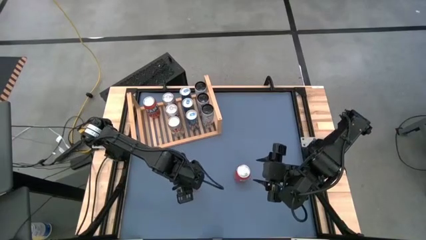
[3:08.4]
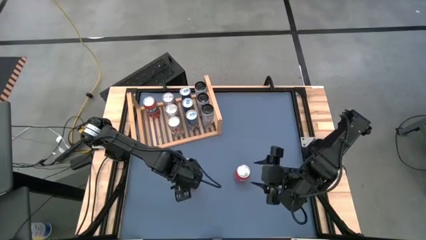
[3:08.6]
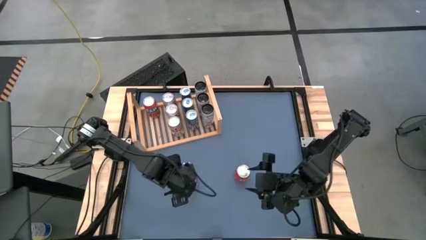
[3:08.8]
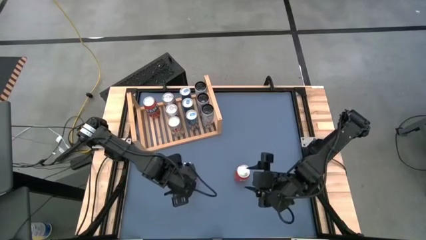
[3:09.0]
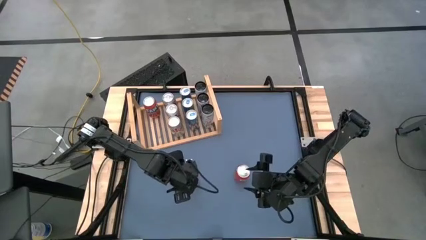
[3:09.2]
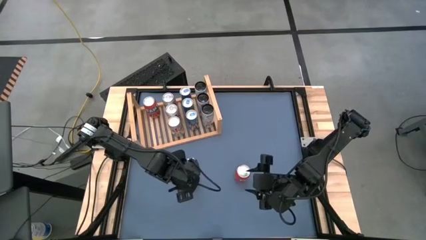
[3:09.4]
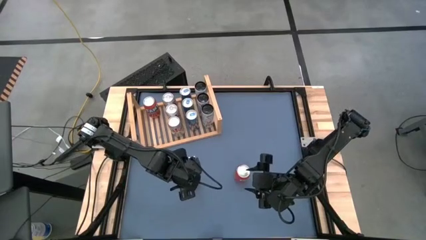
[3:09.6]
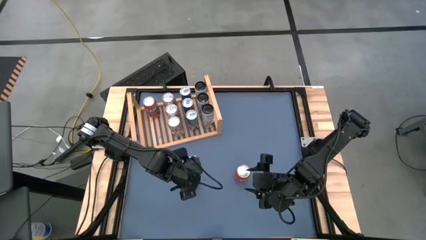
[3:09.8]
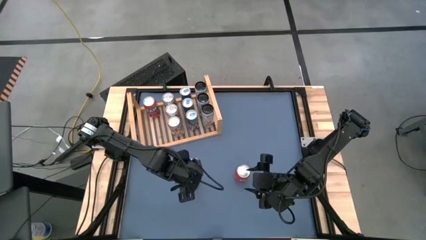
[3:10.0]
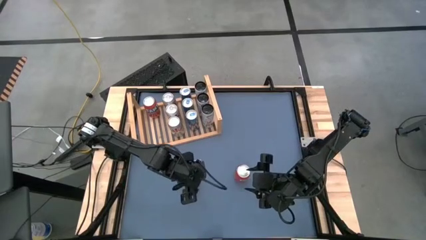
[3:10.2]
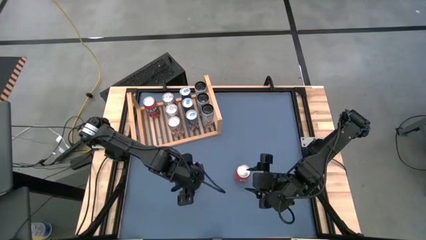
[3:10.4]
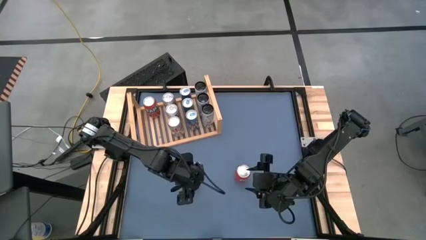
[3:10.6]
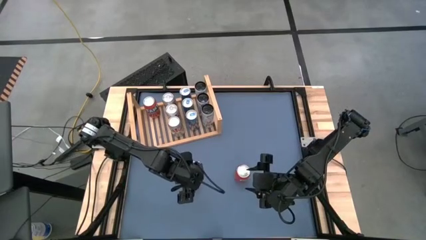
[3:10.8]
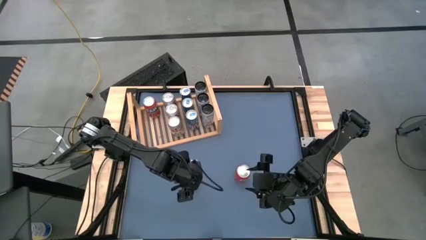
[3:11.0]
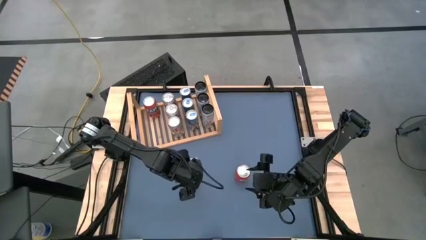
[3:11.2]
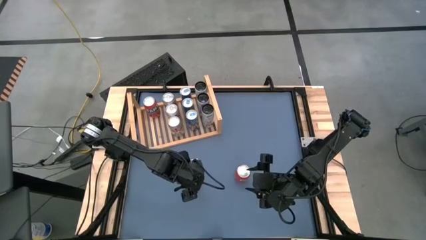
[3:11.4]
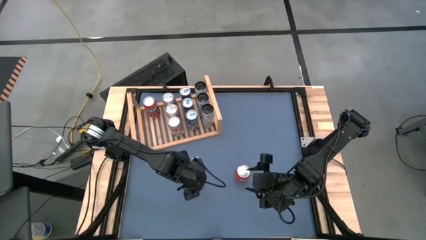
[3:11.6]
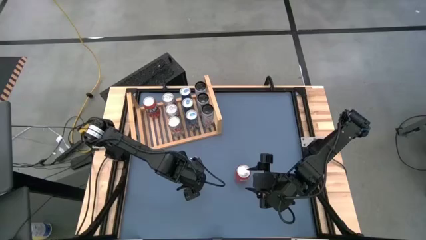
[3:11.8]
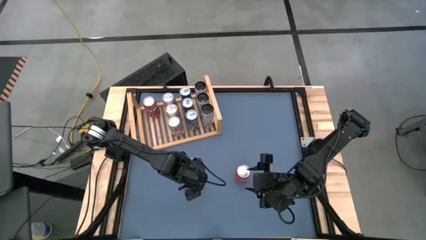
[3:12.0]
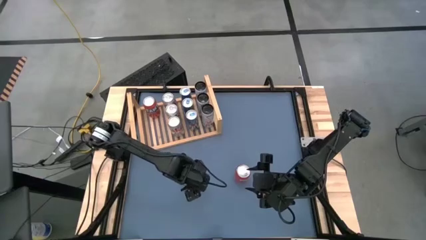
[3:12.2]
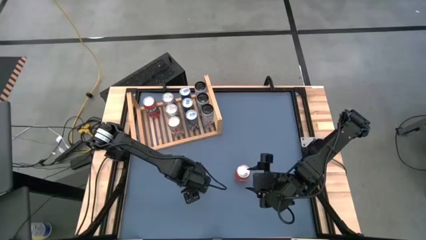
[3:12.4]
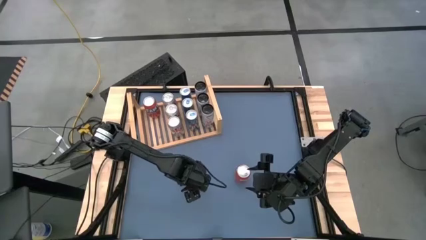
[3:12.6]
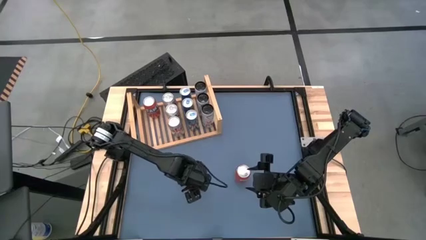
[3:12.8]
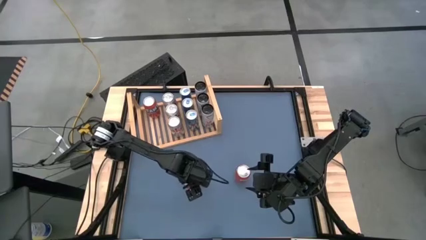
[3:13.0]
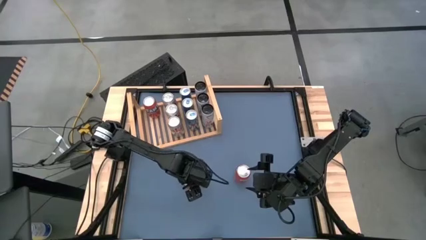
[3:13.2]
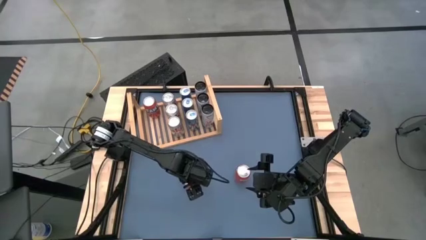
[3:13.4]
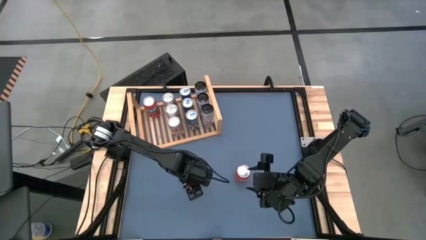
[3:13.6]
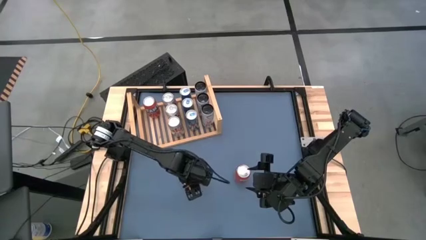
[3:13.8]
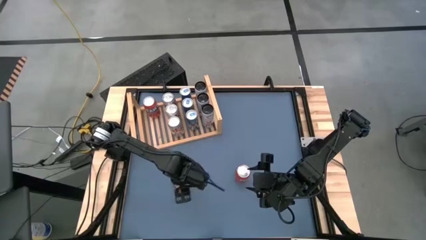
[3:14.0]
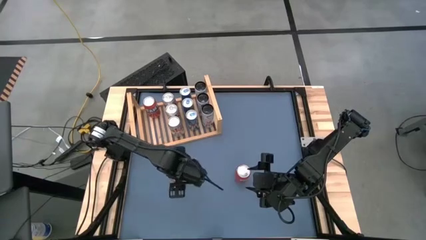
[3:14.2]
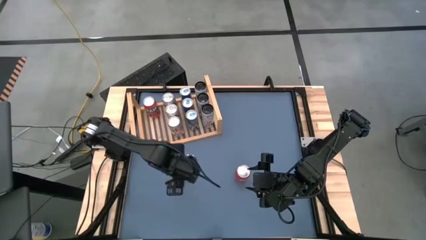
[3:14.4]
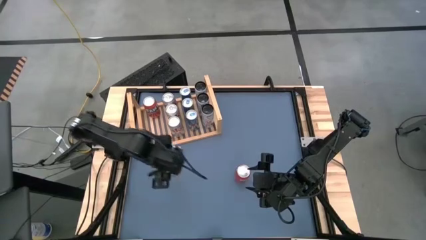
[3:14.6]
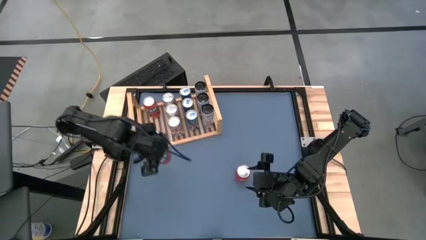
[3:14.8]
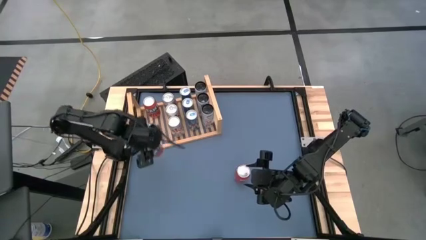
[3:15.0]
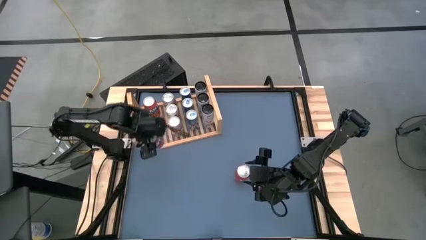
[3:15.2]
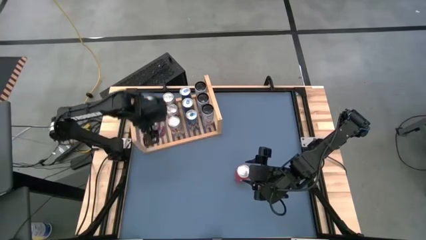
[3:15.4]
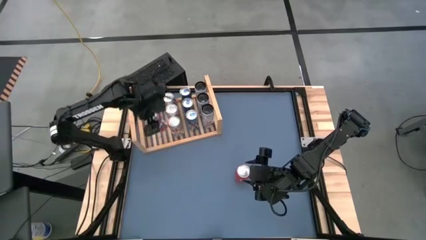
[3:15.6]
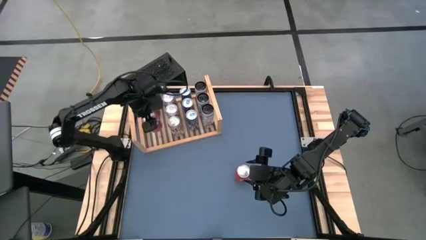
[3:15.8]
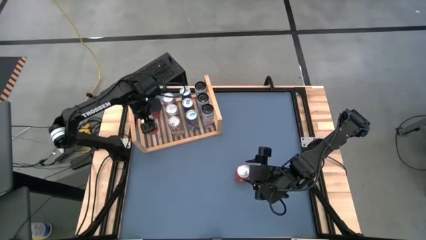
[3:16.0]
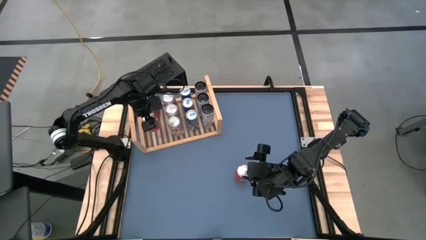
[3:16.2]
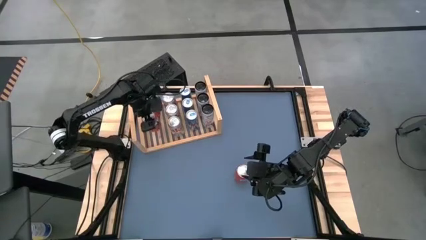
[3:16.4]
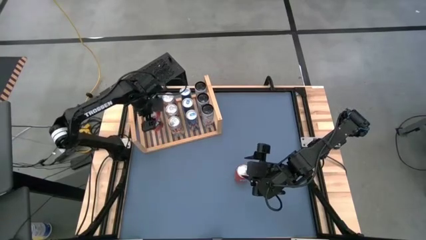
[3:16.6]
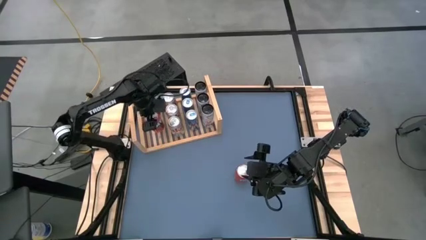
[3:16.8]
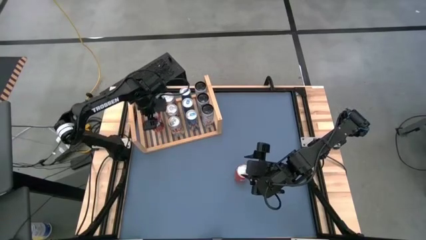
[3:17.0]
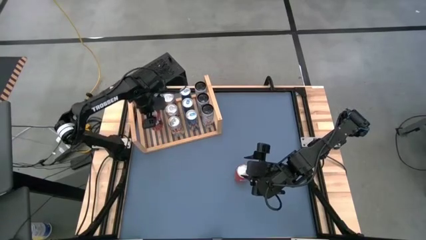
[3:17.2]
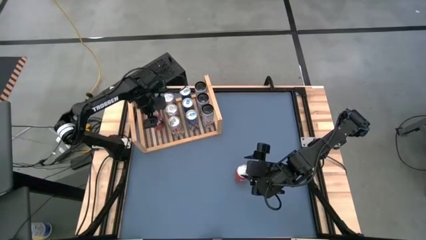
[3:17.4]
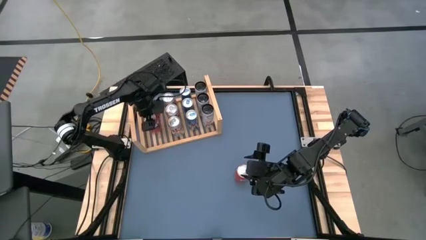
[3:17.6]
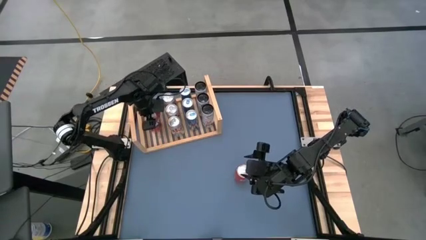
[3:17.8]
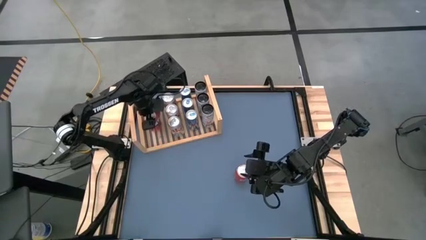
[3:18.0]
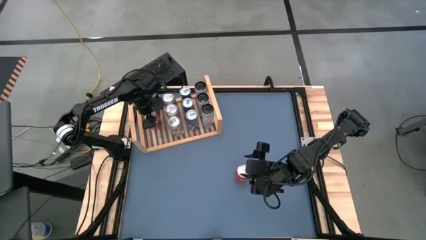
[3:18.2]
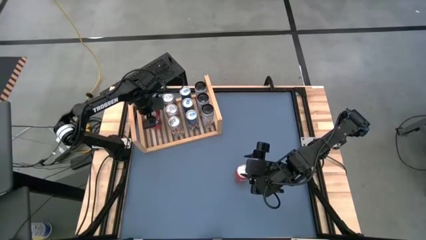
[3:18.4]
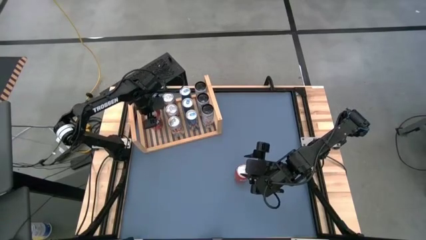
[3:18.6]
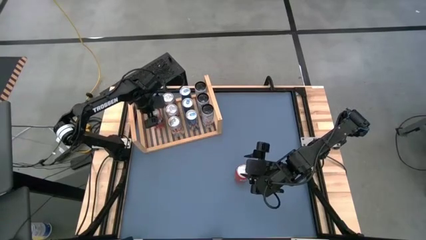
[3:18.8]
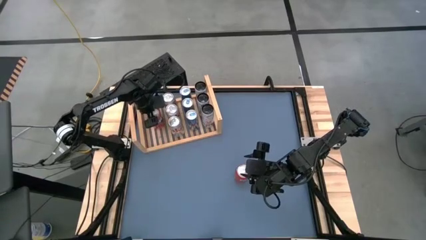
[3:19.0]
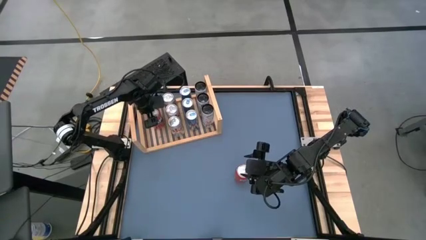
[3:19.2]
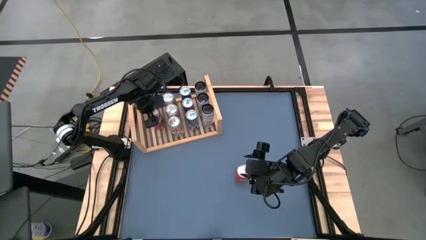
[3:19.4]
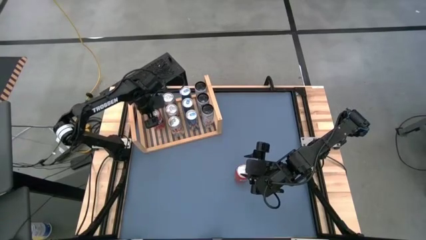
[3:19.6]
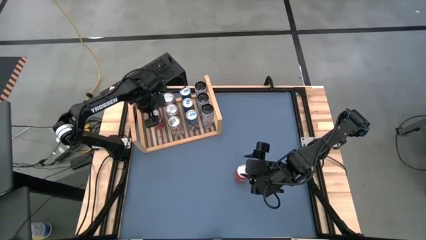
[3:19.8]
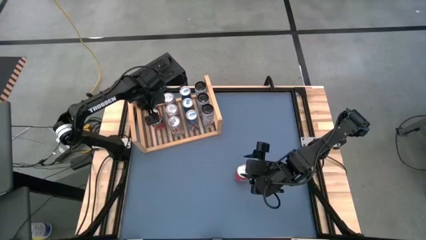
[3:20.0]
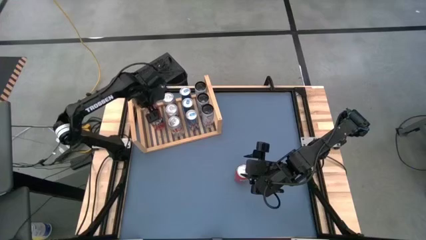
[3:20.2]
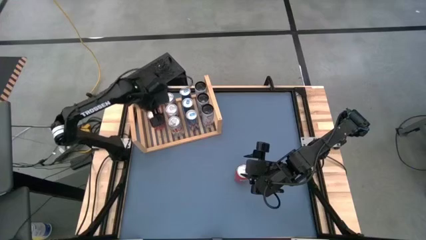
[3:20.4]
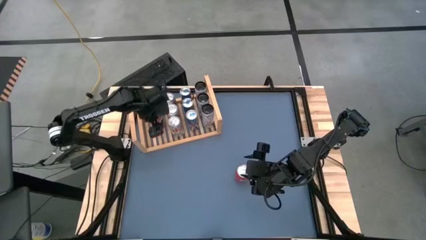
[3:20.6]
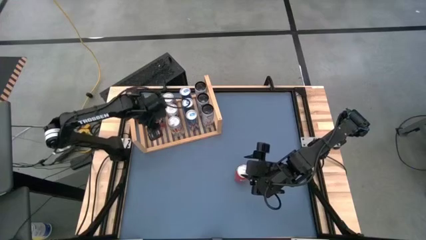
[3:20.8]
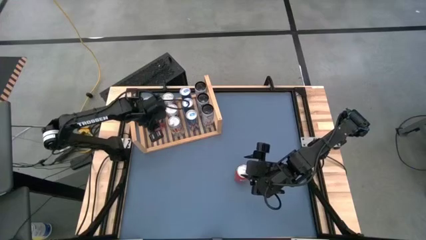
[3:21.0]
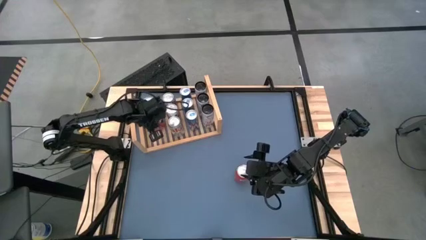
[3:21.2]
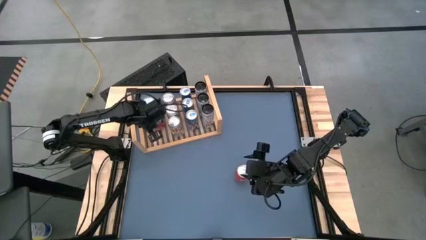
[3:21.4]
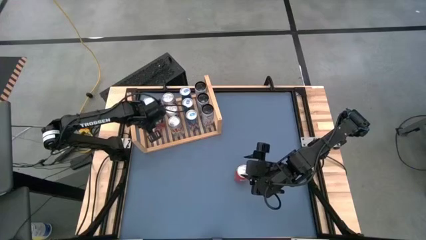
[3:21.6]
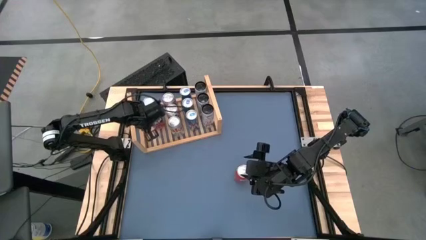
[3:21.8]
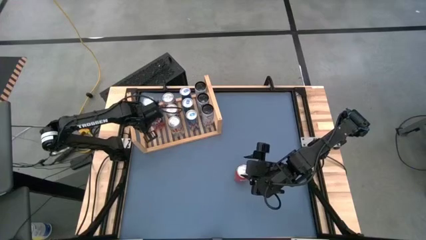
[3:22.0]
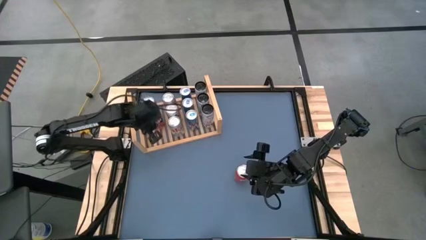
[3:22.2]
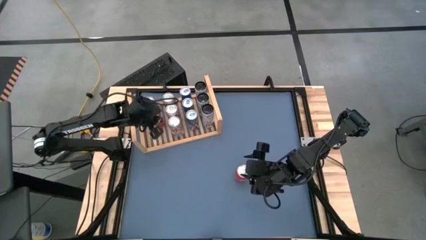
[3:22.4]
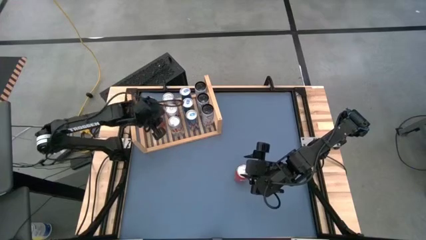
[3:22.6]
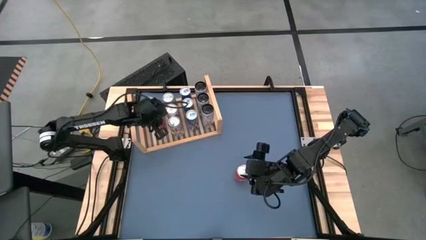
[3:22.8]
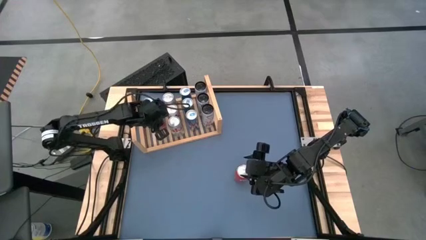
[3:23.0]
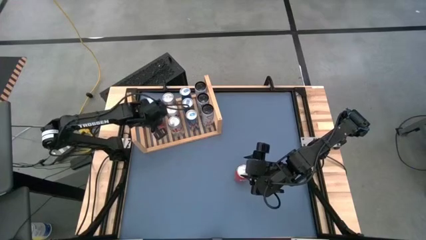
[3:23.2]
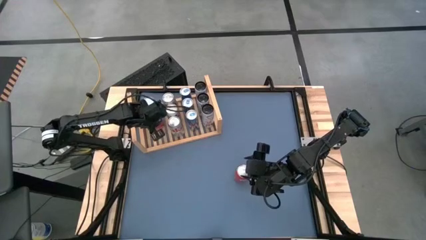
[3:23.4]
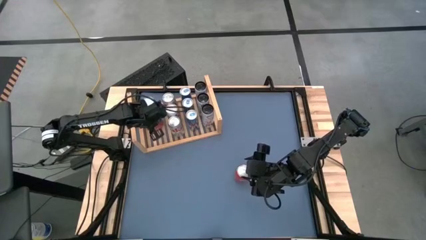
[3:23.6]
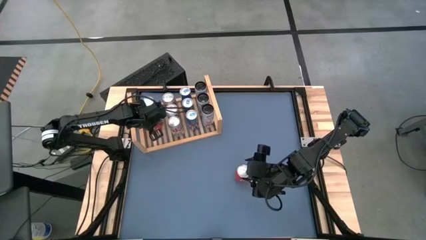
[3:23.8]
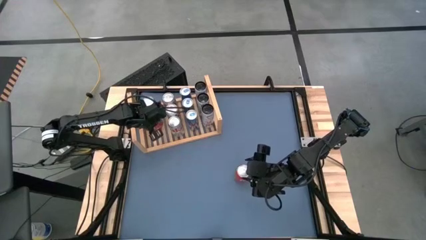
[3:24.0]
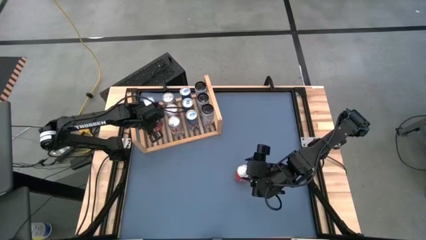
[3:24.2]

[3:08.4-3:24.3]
Task: Place canned beverage on shelf
Put the left red soda can on the shelf aligned with the other red soda can

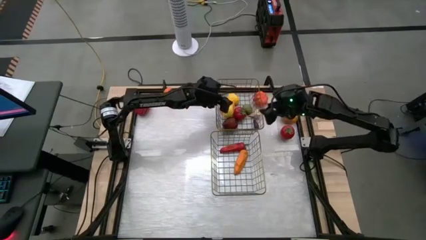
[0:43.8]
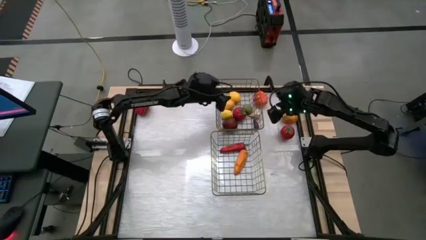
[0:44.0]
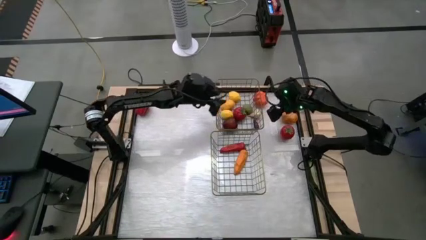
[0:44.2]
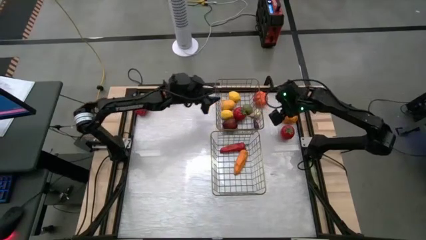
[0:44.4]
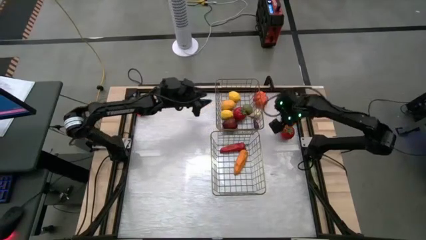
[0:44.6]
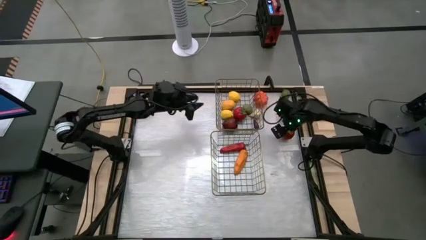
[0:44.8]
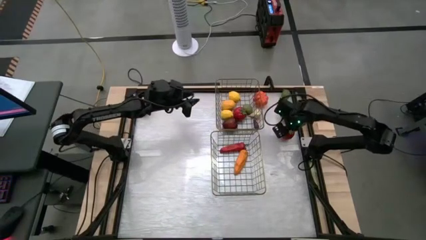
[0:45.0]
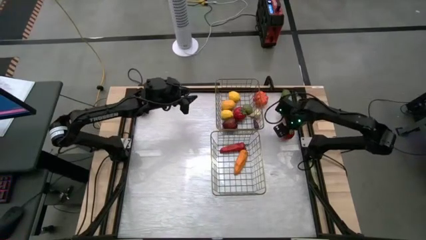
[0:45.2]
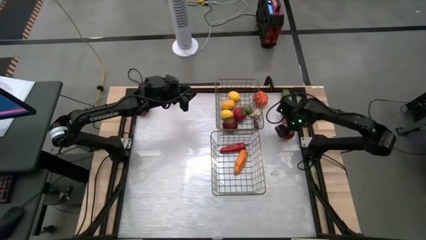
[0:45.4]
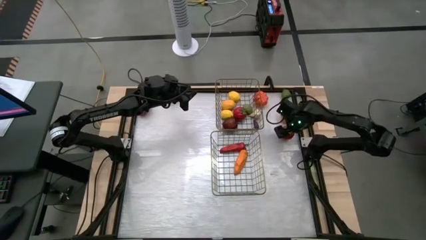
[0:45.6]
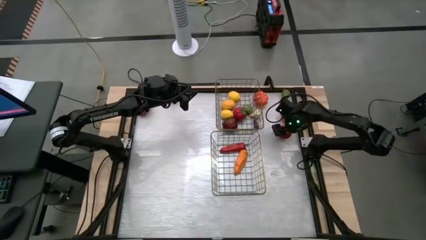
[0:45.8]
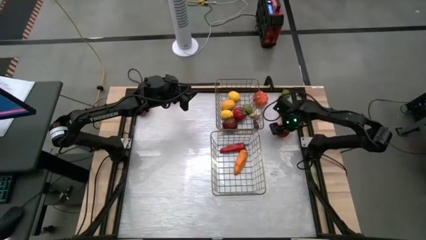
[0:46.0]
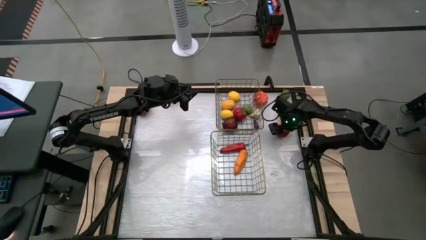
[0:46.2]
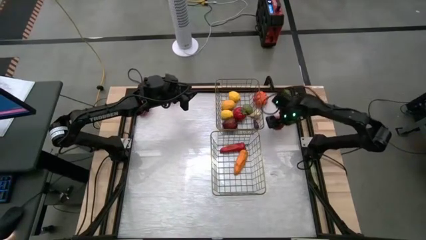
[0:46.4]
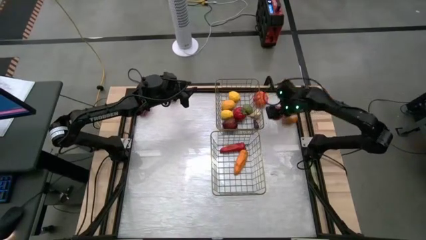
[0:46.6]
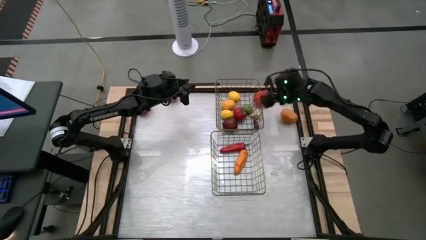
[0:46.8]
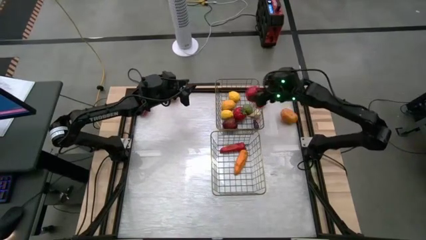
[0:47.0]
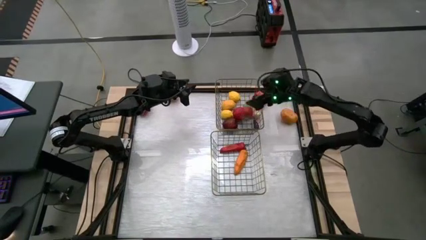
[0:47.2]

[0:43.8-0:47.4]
Task: Sort produce into baskets
Put the right red tomato into the top wire basket
